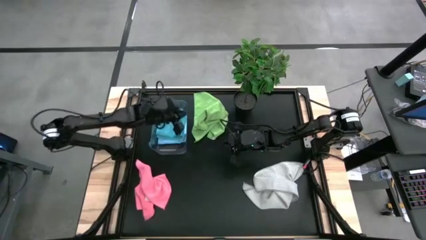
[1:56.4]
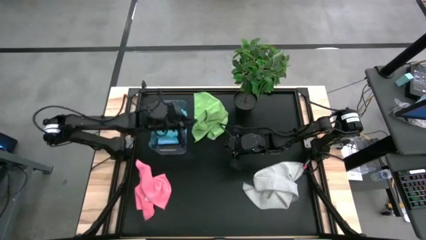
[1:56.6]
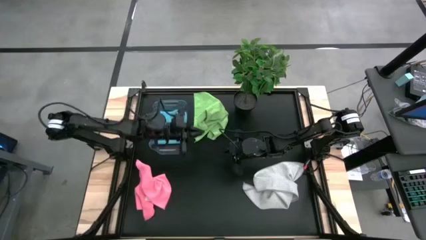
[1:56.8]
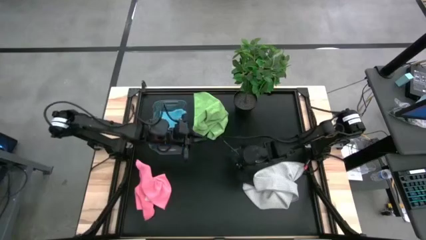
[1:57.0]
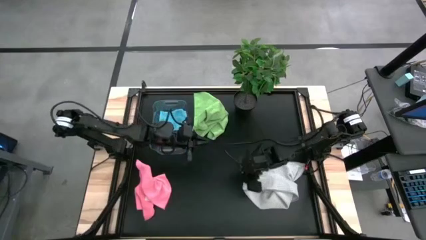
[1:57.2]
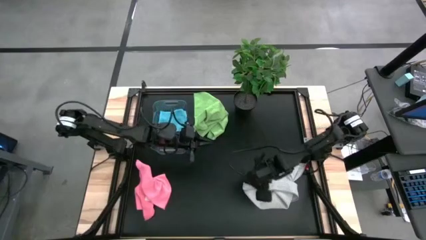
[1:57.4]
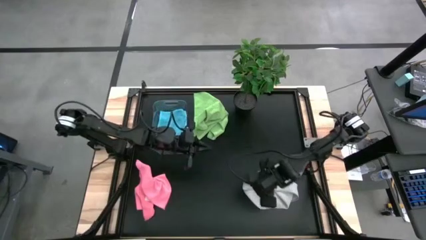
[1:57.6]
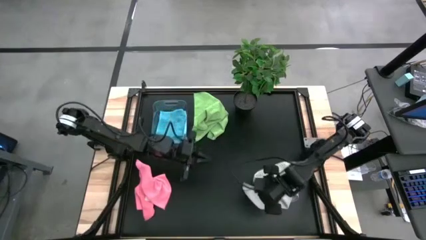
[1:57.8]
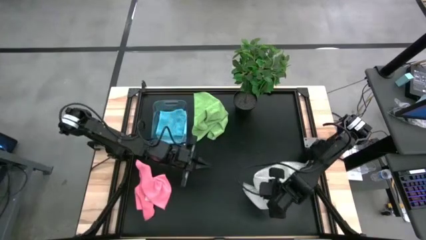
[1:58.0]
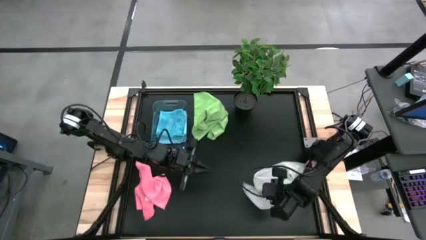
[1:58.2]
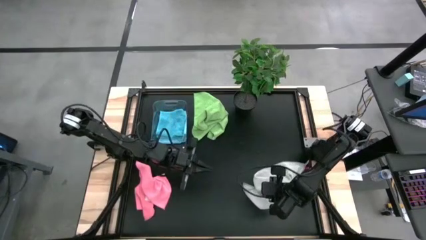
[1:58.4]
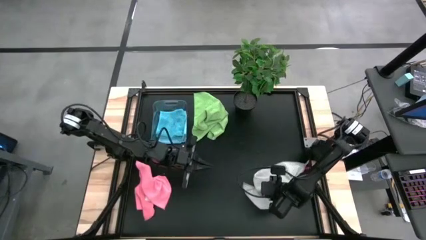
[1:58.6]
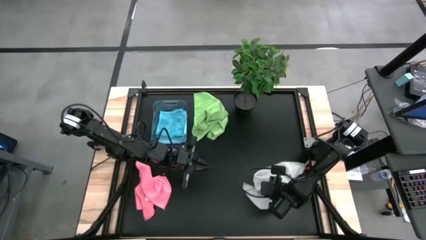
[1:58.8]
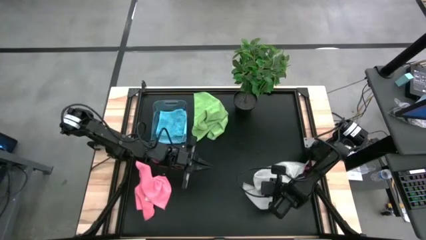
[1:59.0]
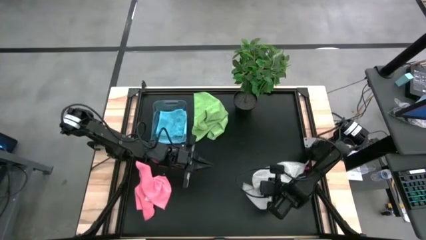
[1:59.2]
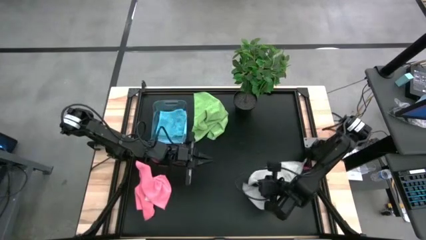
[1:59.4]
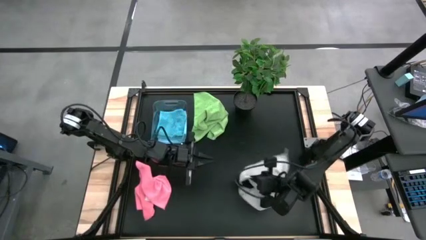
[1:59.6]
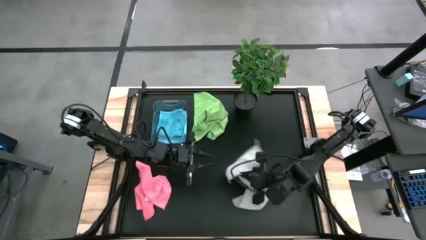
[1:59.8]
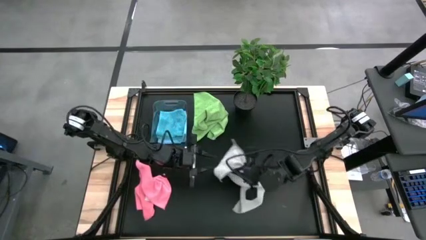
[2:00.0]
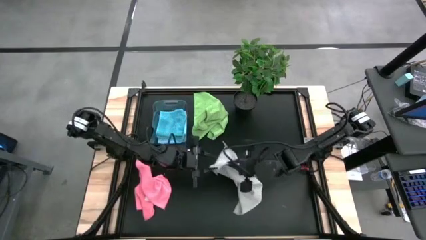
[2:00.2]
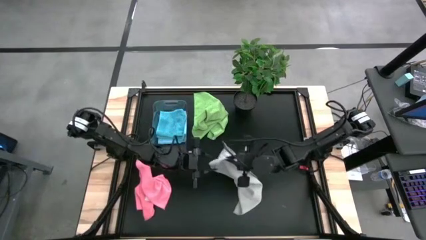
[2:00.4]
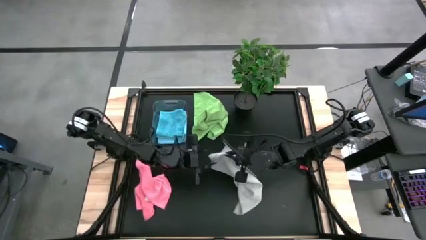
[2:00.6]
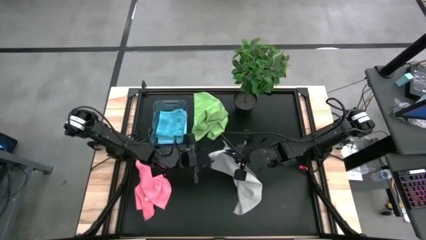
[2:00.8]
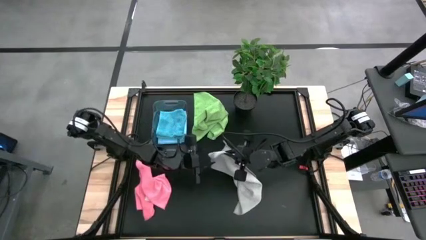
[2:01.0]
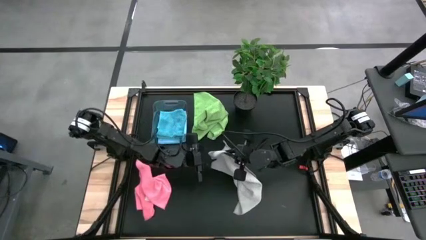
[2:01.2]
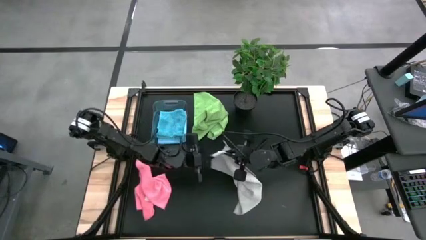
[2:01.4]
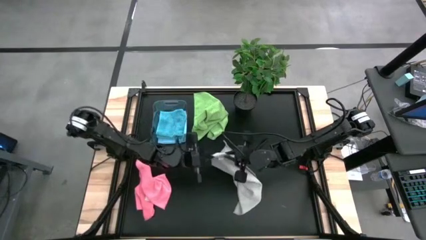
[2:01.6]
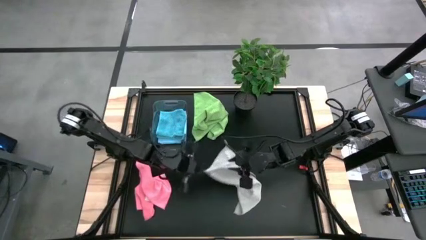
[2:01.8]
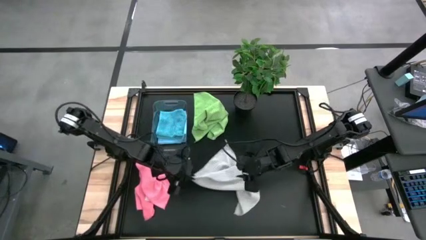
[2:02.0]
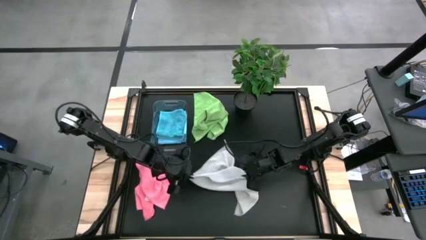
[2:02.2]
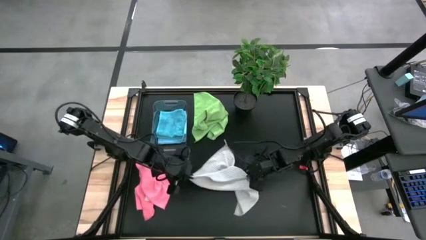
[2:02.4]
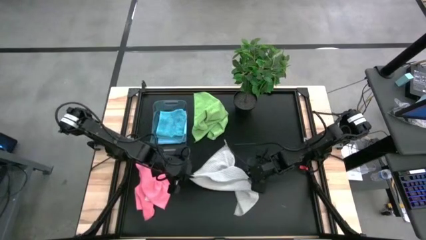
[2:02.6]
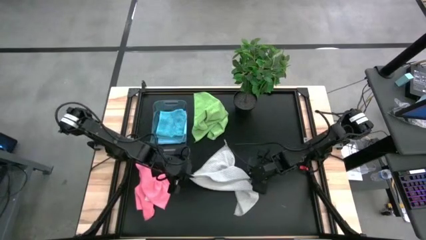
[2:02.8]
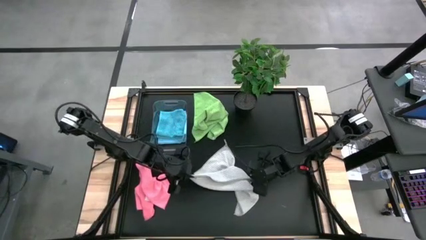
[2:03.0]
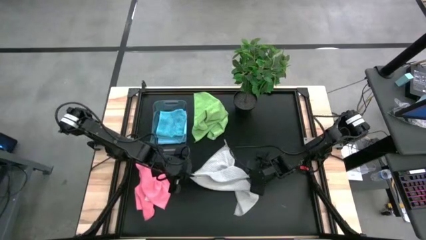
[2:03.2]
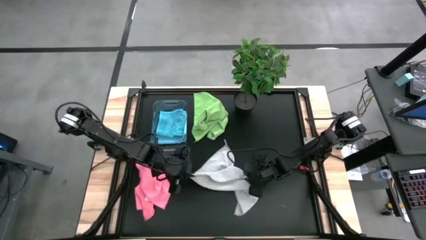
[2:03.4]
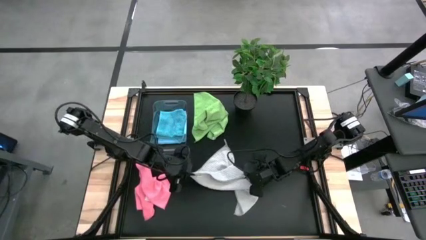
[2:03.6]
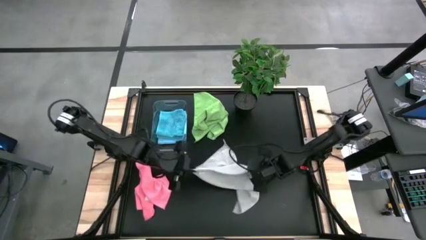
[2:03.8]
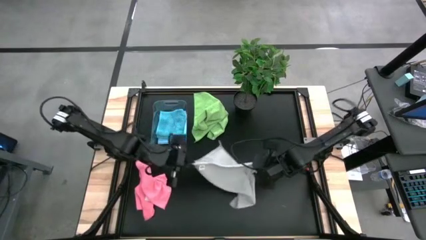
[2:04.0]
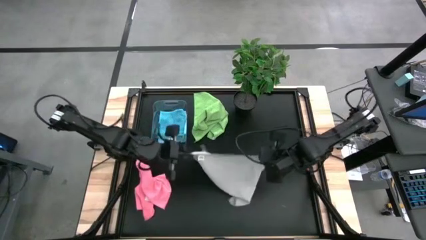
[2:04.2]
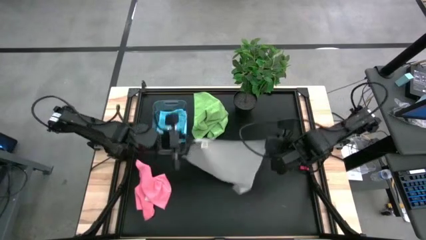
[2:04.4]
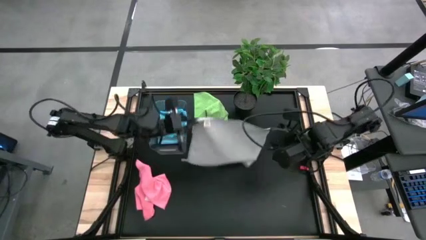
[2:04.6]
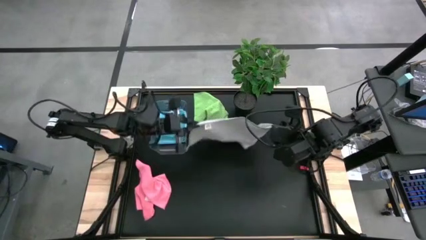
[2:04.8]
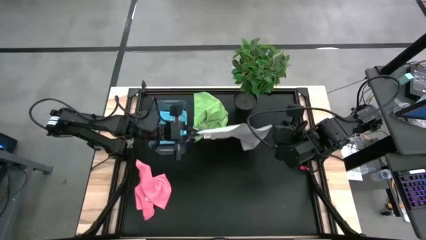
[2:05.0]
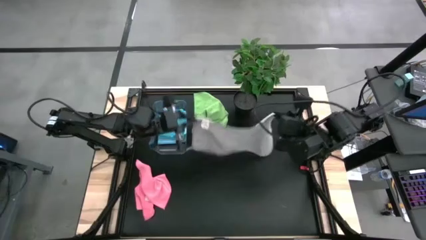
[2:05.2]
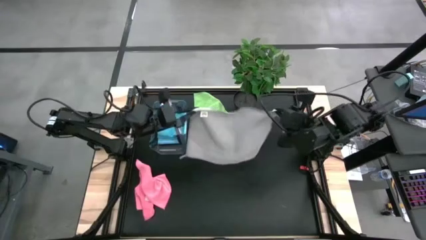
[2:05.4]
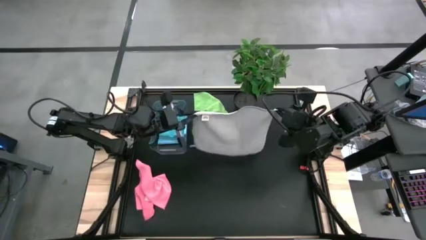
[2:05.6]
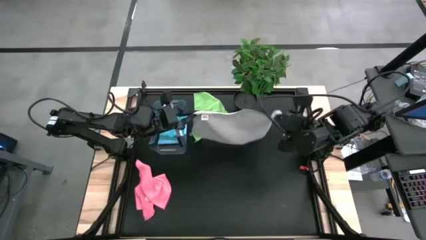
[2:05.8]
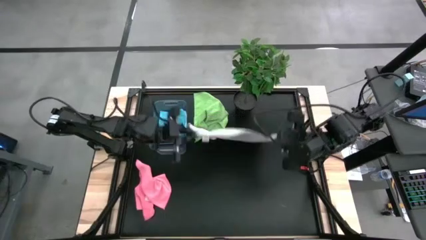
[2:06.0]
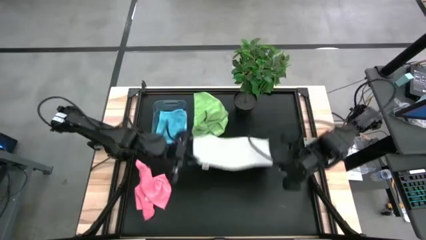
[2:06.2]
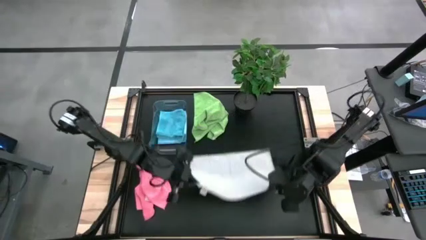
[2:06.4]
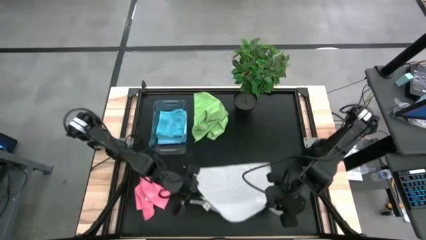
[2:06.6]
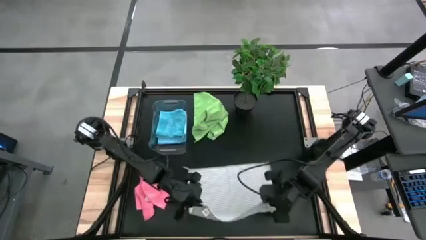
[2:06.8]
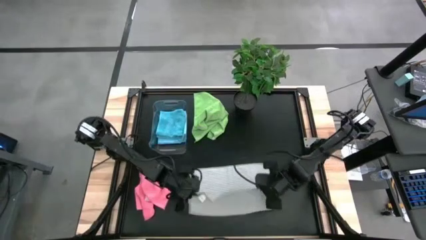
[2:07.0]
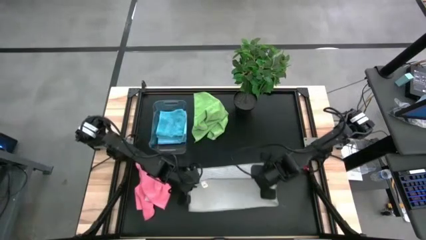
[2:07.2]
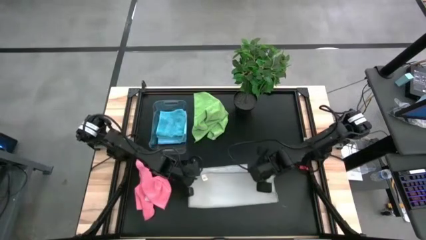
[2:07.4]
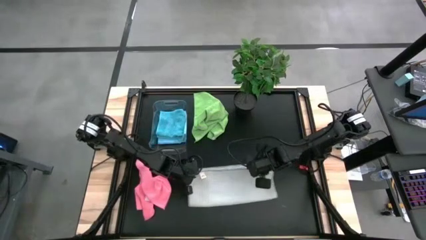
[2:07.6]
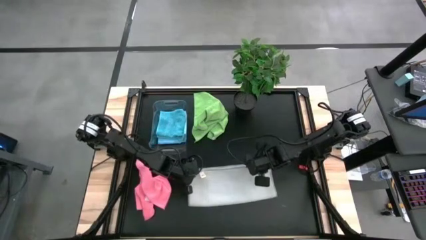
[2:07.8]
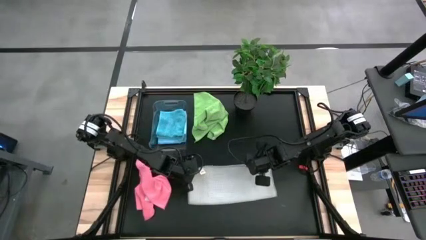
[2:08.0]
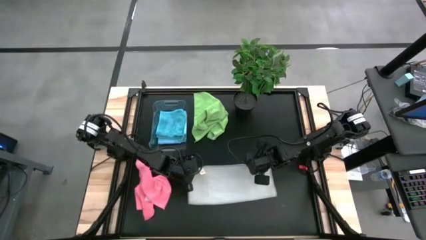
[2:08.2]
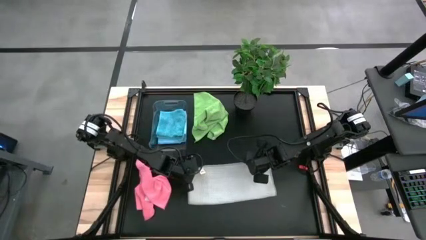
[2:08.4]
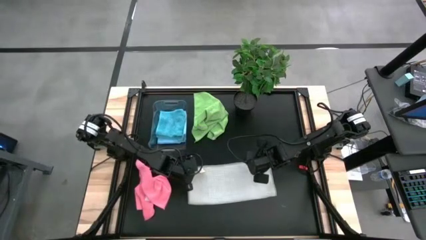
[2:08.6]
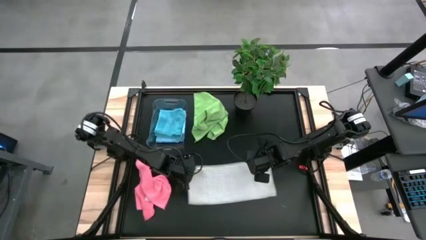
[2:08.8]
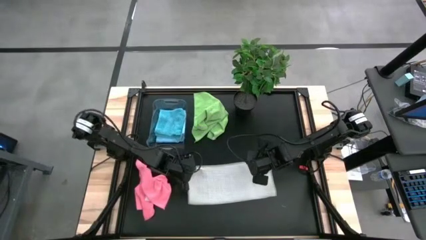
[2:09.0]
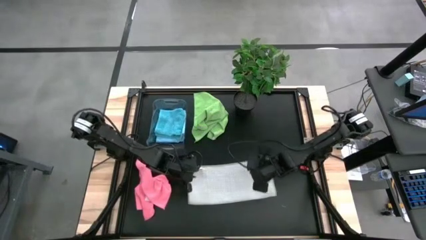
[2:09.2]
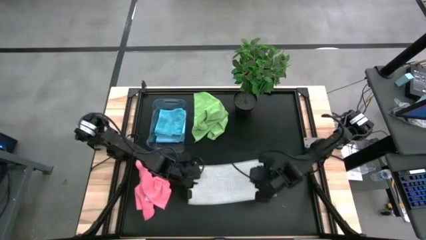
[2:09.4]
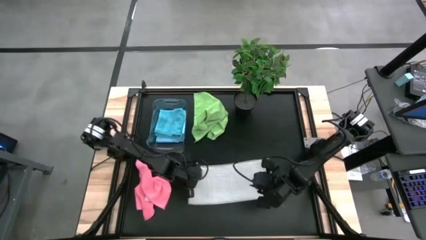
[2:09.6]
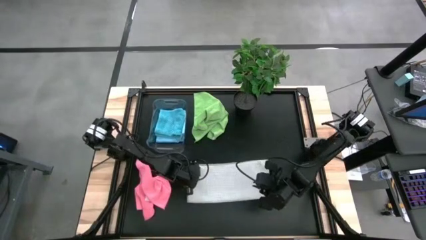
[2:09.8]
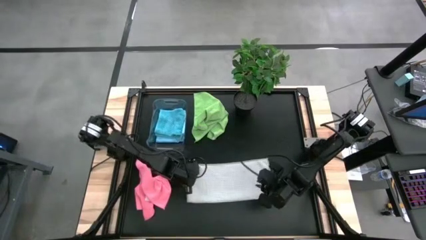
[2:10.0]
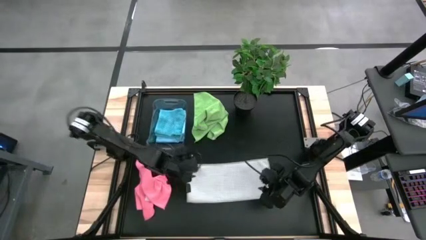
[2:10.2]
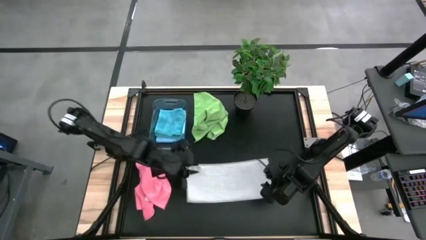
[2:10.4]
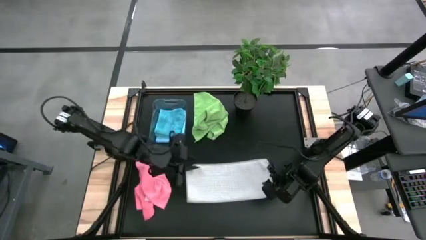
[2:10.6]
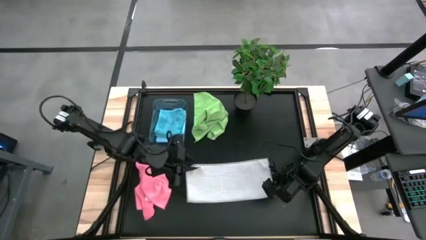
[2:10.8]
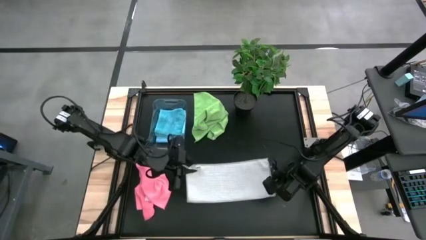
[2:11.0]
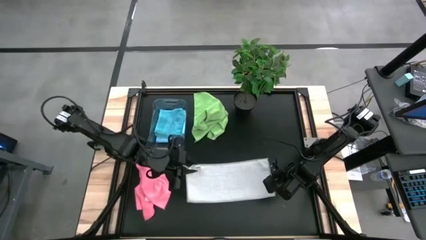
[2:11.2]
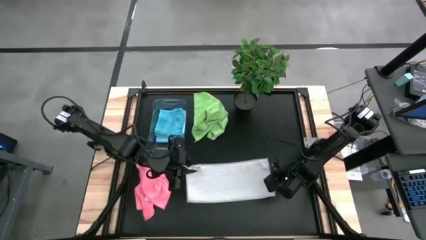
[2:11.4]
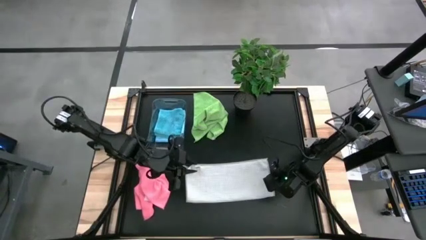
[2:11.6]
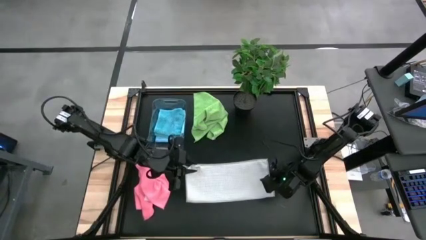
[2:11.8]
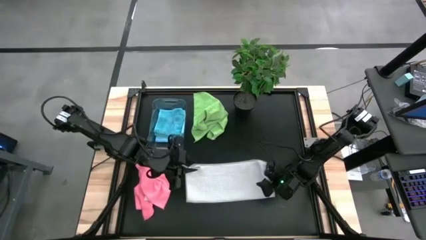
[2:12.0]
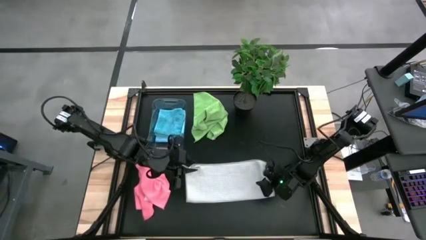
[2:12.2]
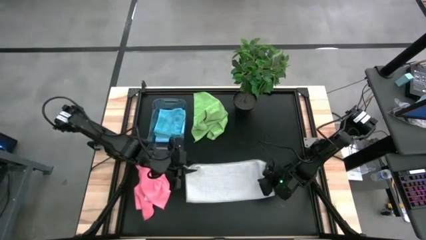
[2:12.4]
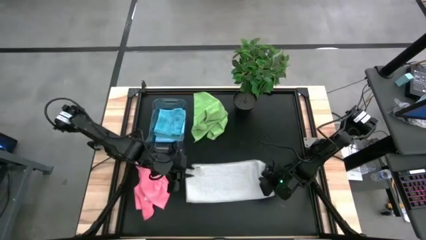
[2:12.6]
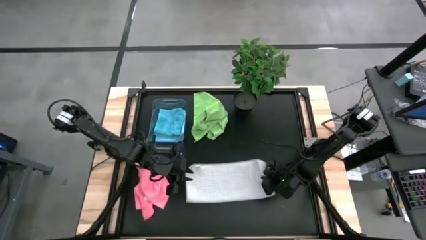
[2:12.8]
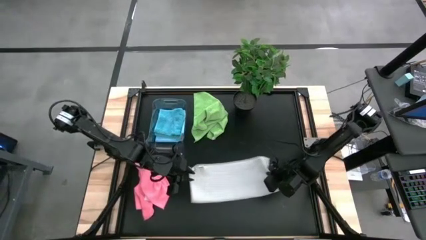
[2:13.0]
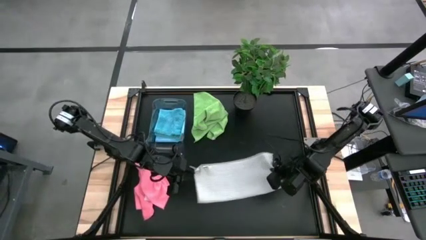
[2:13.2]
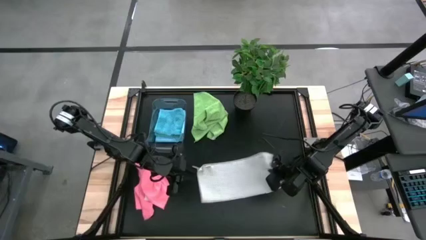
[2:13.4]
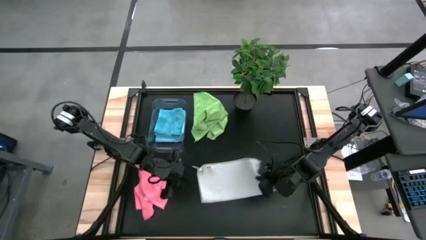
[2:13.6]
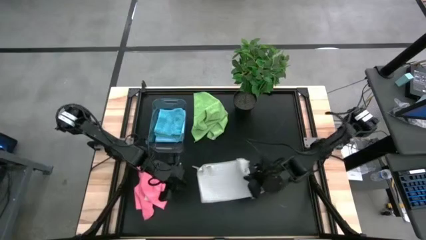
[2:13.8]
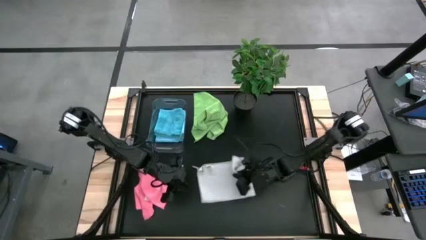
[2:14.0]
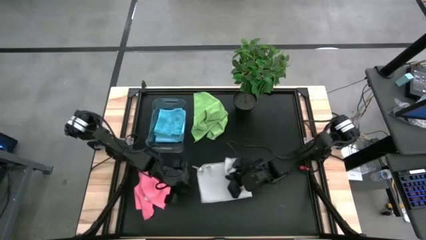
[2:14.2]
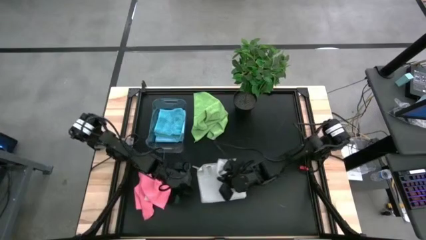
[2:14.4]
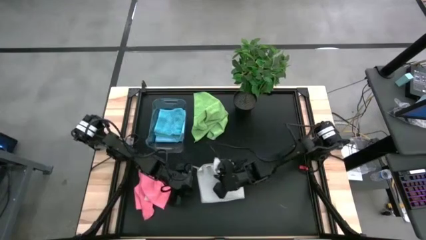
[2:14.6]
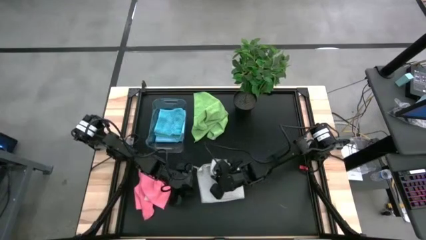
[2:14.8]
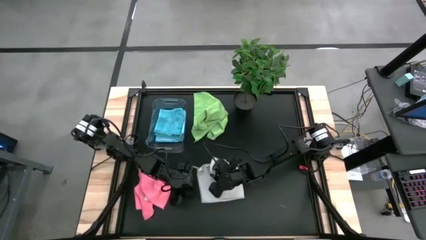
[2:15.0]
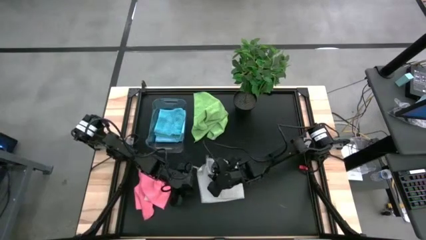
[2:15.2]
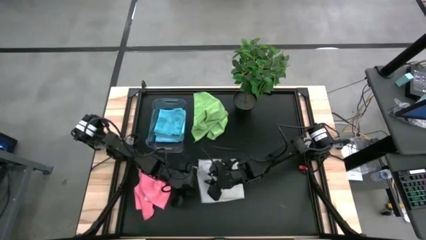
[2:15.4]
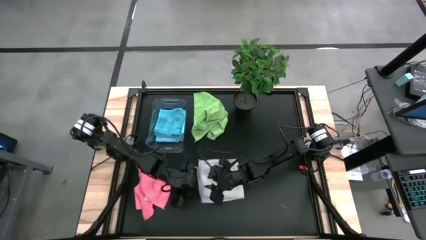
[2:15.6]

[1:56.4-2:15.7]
Task: Fold microfiber towels
Fold the white microfiber towel
